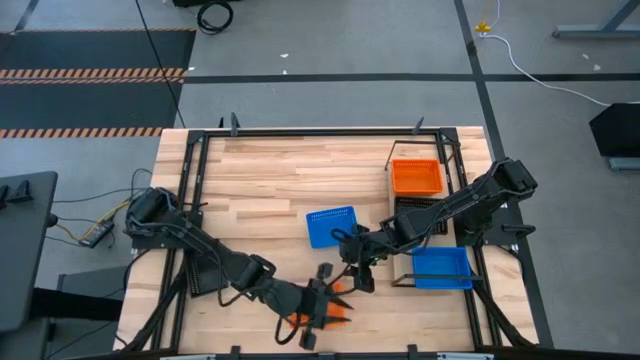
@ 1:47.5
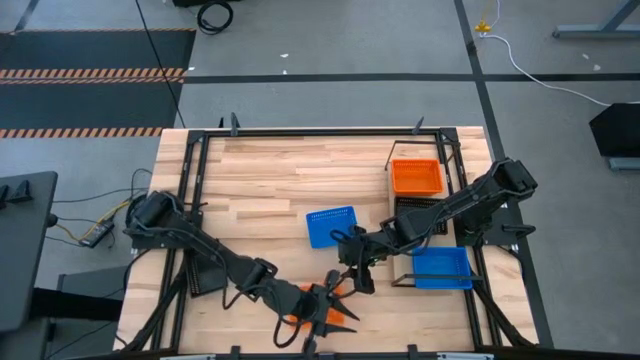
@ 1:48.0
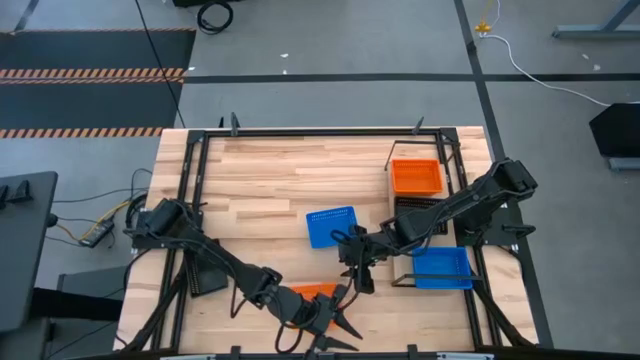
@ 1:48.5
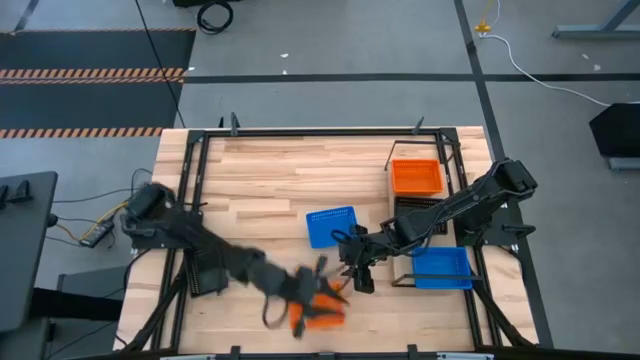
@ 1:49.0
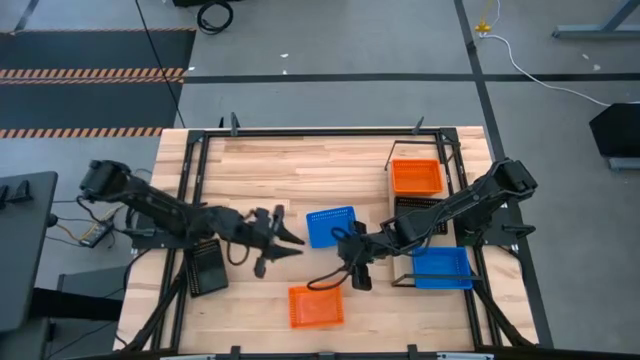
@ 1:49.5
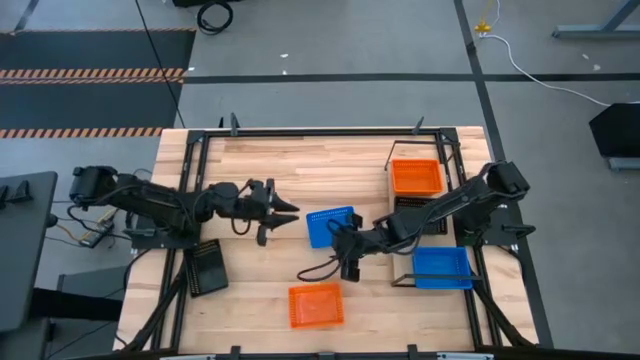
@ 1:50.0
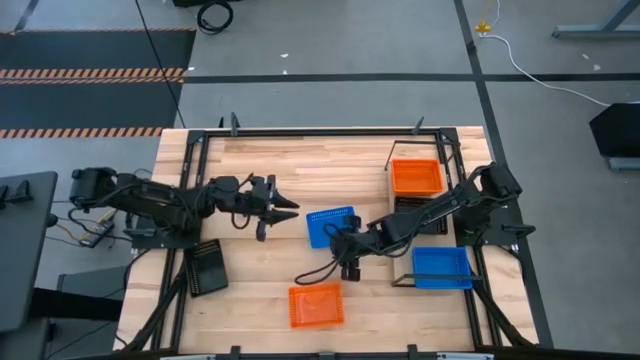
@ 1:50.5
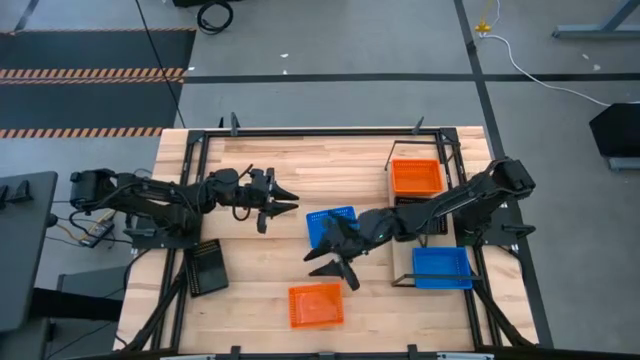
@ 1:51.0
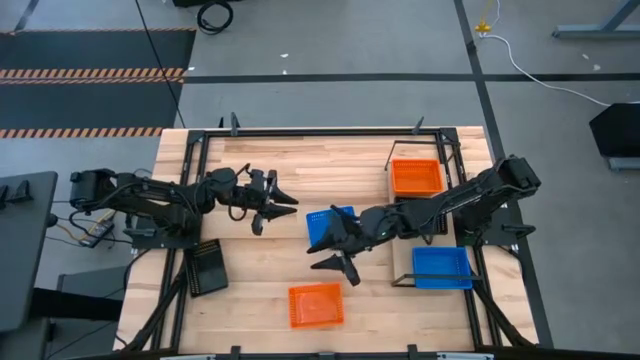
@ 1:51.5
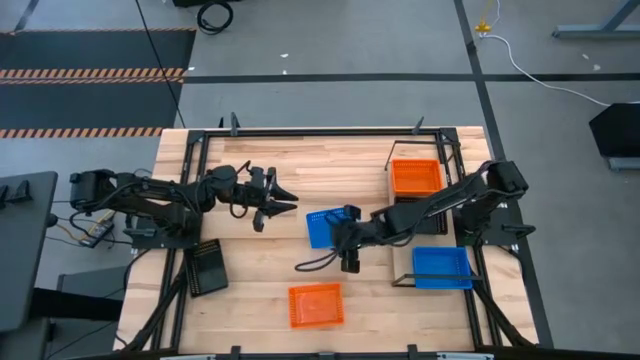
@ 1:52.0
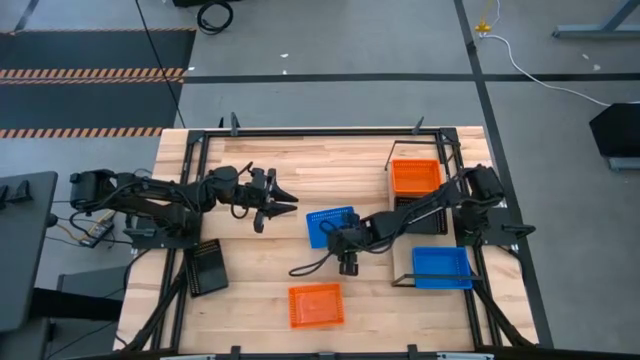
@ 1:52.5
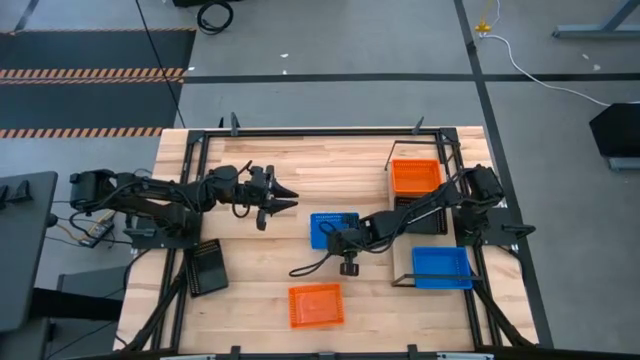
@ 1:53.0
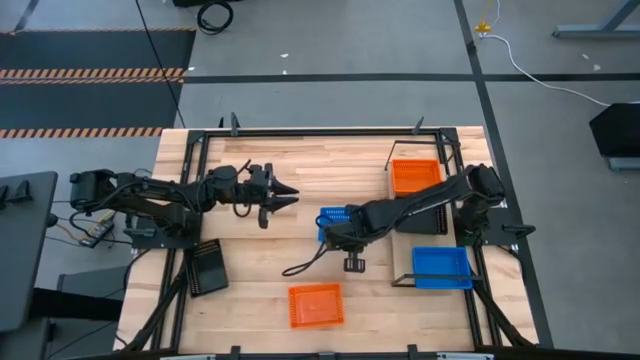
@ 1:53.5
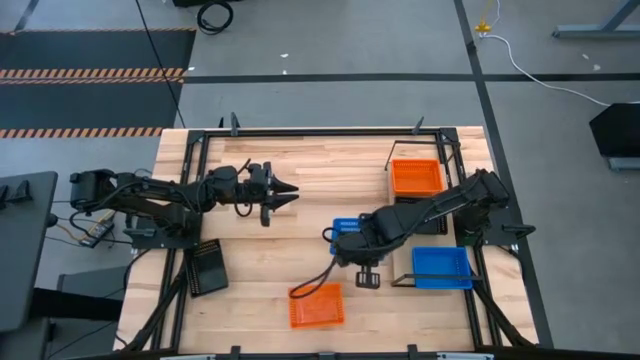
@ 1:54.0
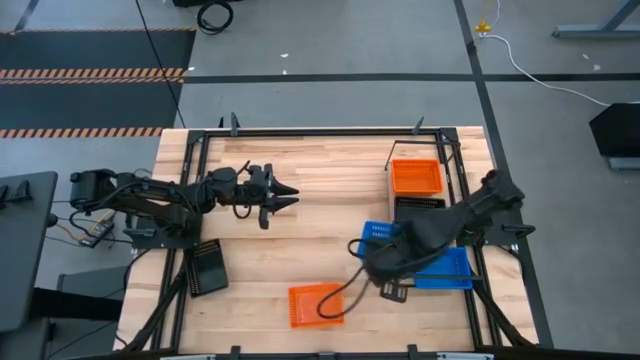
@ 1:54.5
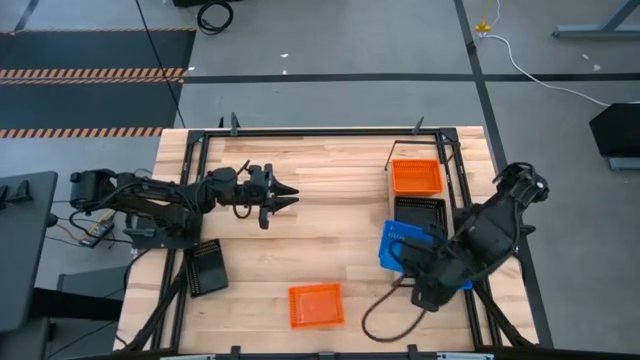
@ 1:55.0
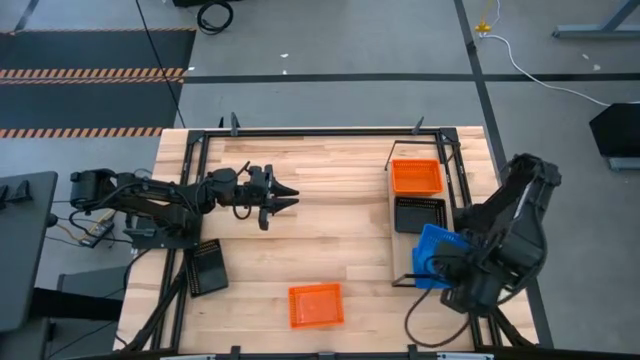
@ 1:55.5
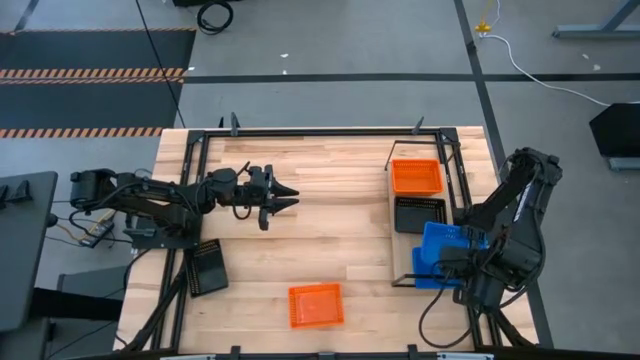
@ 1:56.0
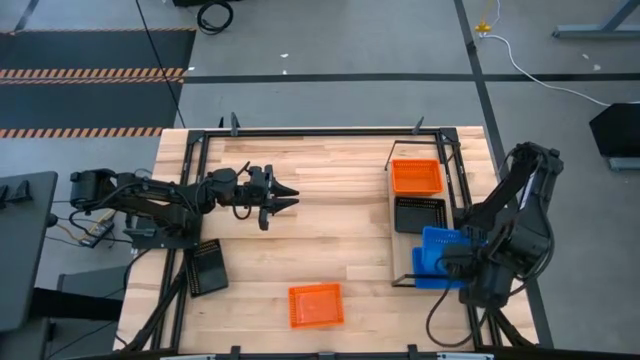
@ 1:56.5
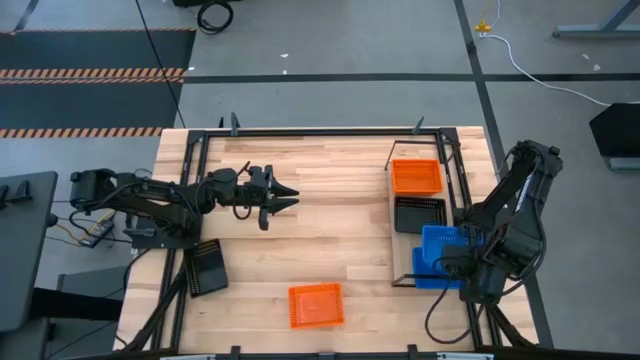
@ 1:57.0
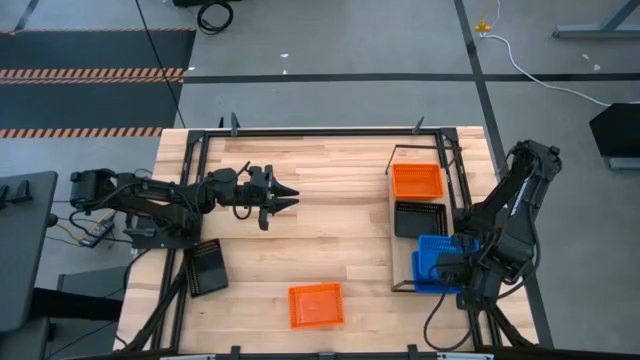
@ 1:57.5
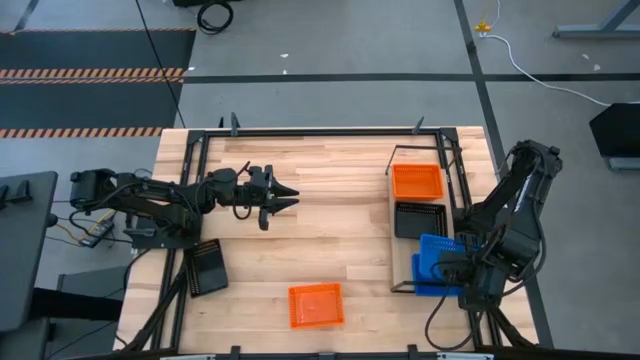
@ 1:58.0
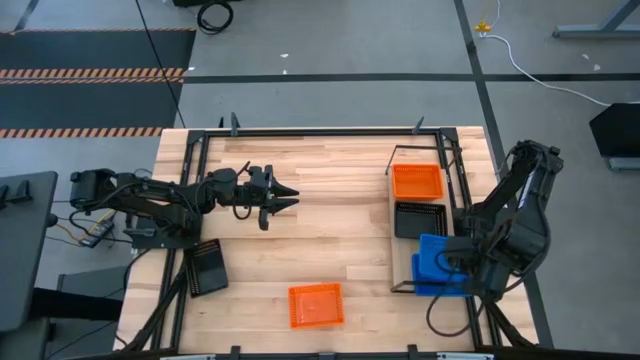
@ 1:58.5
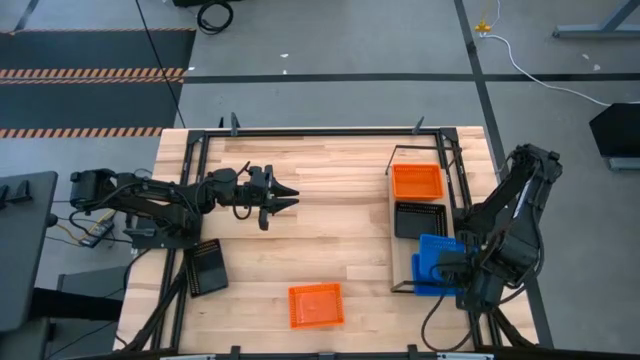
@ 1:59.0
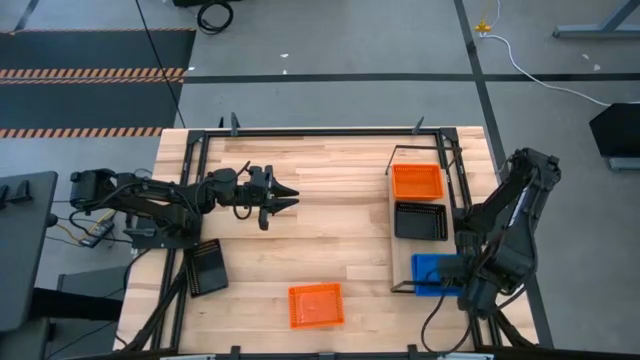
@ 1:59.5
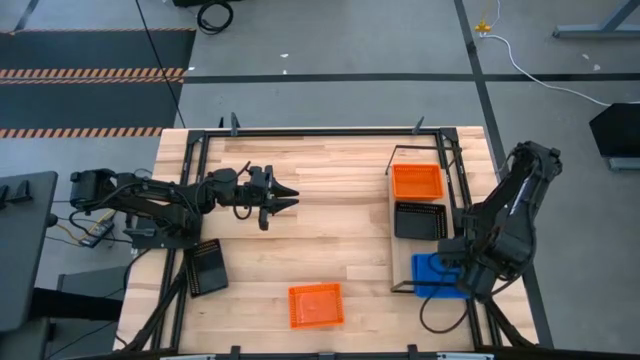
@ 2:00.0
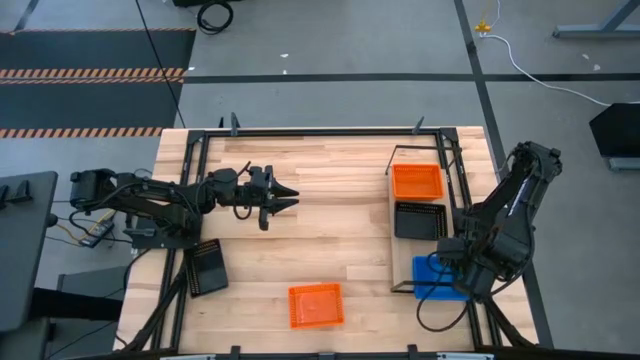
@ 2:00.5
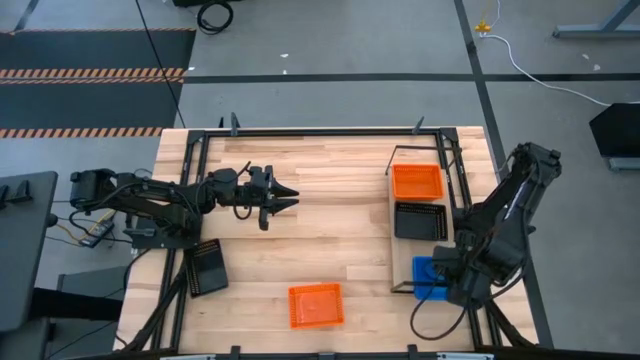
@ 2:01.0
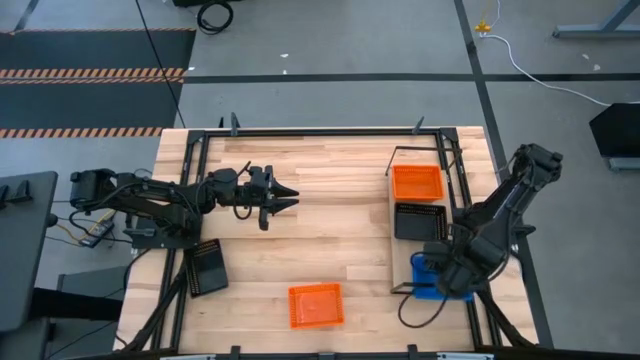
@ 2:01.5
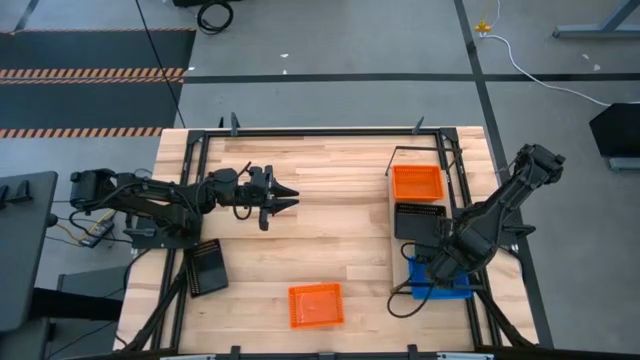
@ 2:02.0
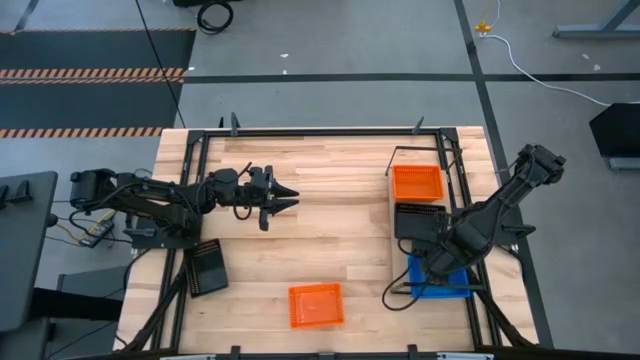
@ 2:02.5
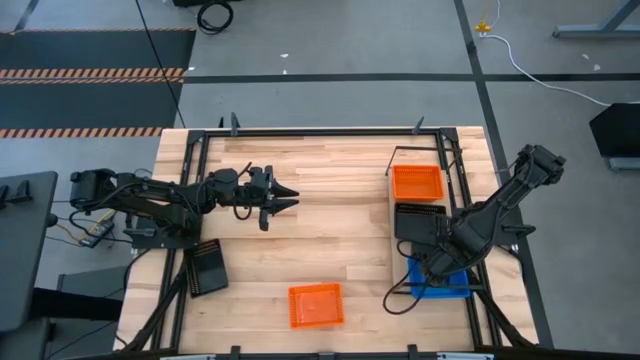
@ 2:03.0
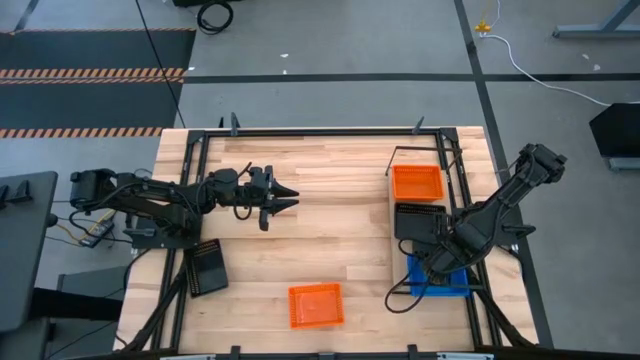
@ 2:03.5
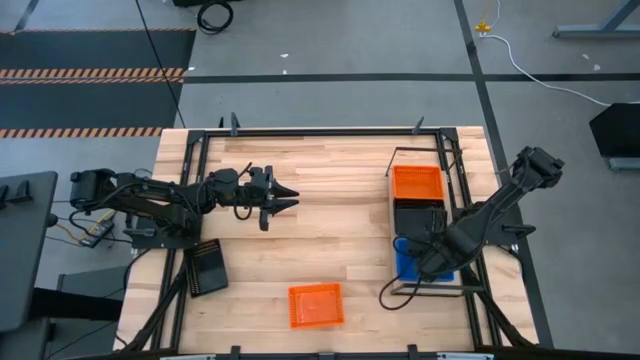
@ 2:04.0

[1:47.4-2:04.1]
Task: Stack baskets on shelf by color
Stack the blue bin on top of the blue bin on the shelf

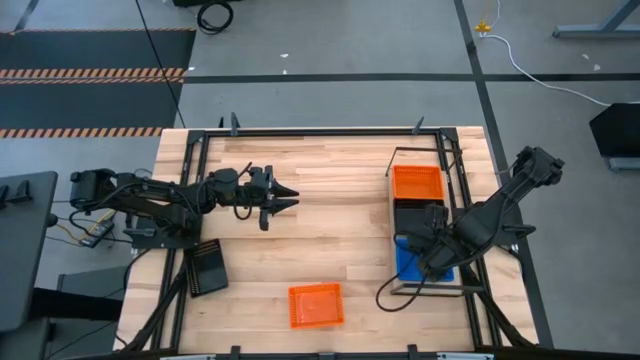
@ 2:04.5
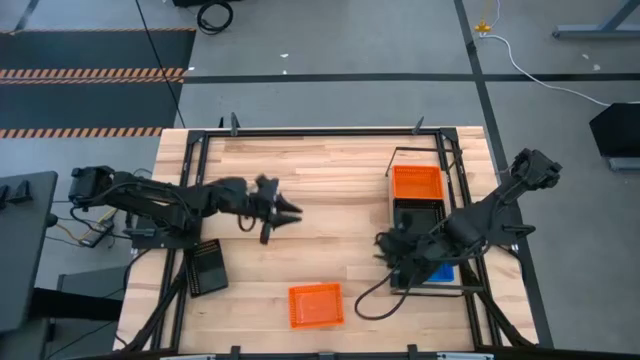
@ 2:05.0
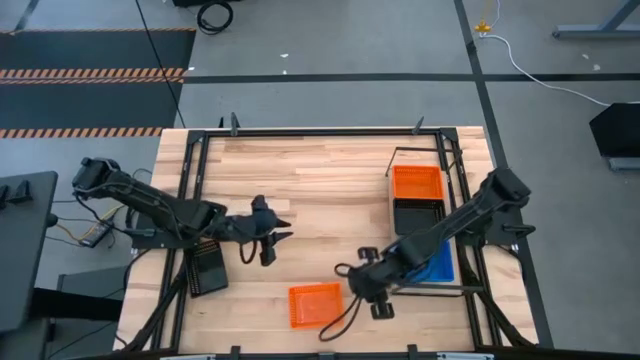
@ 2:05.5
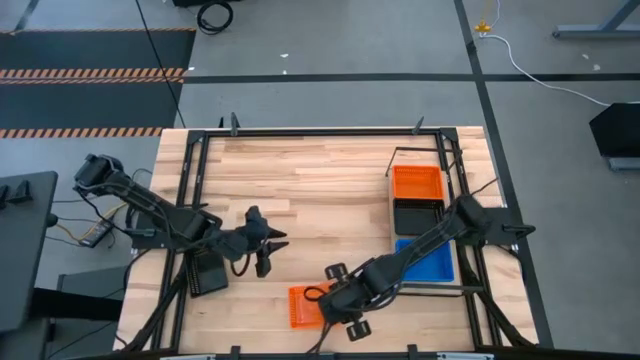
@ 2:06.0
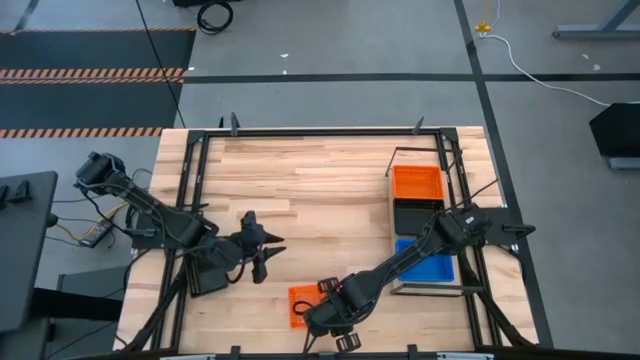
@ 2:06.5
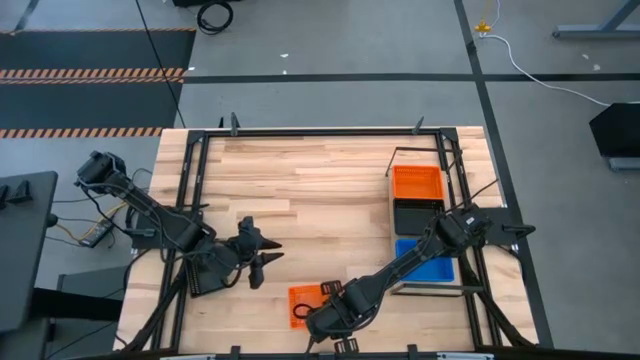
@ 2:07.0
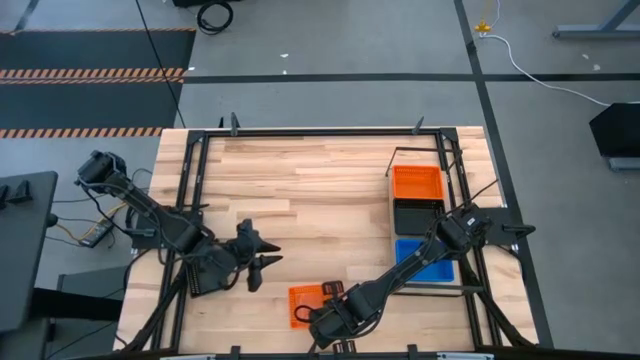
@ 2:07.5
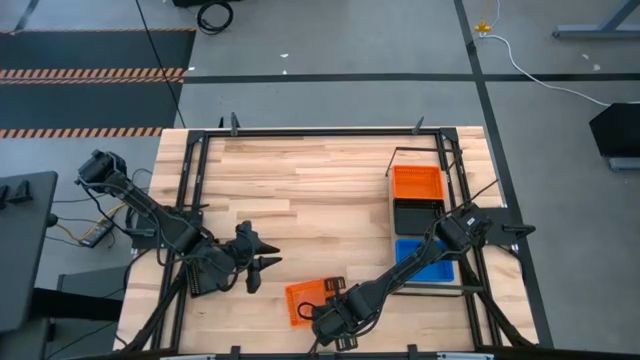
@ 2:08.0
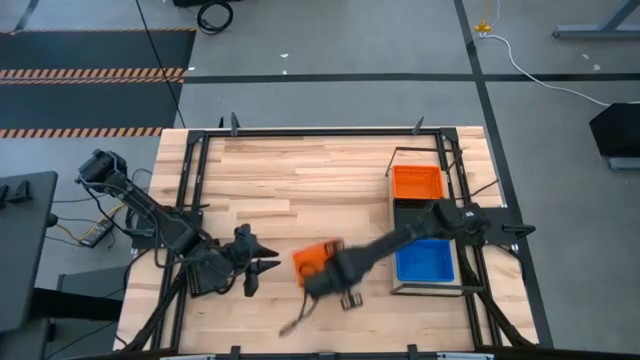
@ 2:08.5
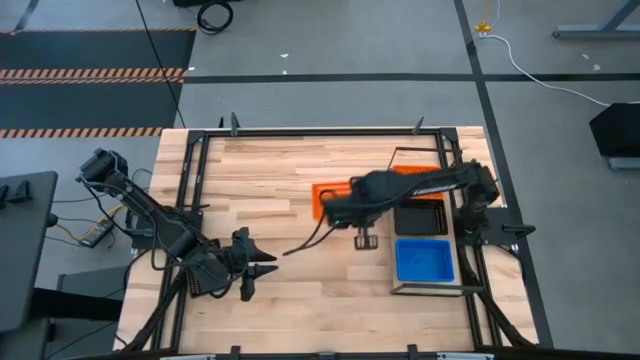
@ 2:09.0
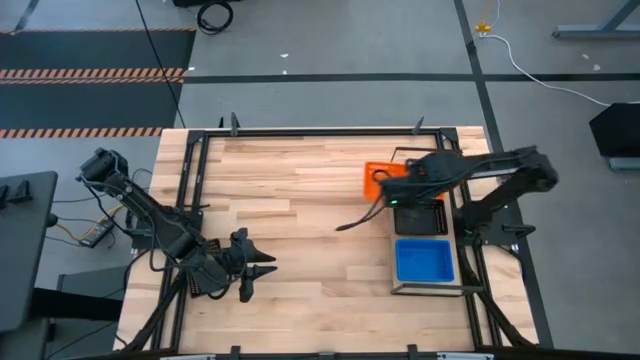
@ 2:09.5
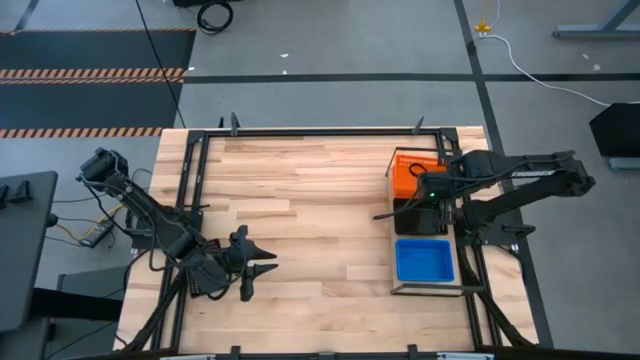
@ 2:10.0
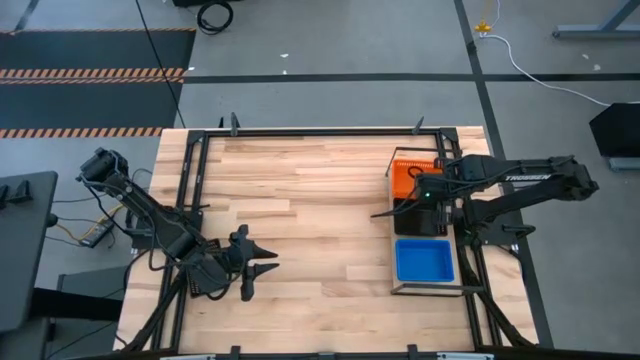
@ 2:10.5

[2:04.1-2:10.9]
Stack the orange bin on top of the orange bin on the shelf
